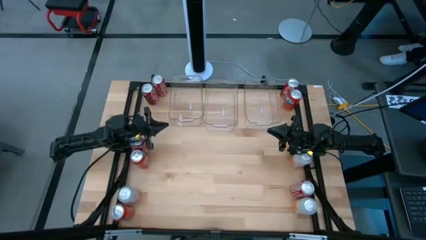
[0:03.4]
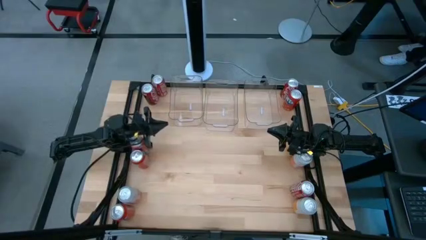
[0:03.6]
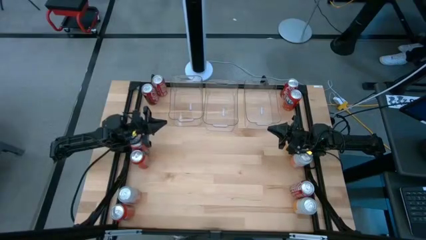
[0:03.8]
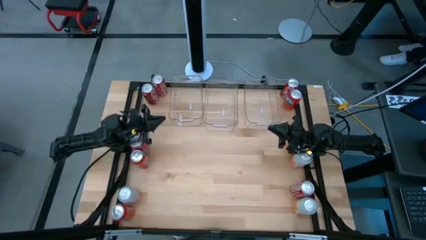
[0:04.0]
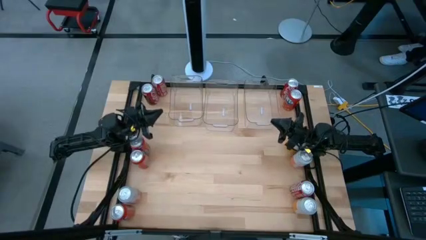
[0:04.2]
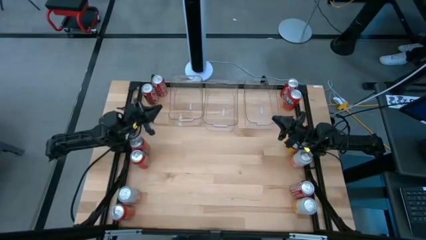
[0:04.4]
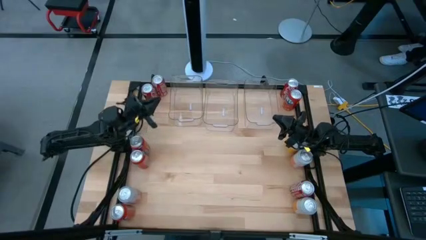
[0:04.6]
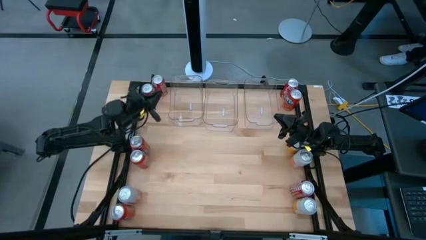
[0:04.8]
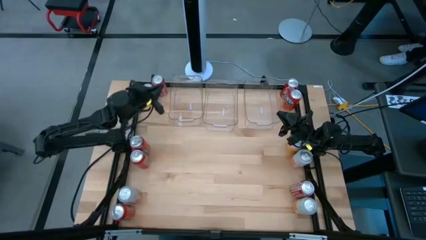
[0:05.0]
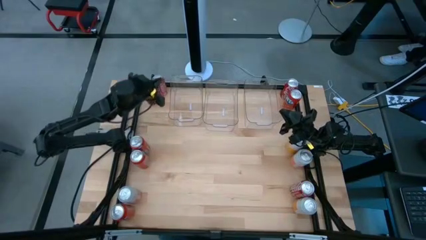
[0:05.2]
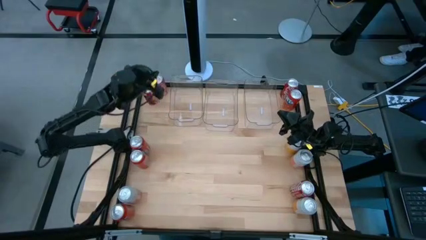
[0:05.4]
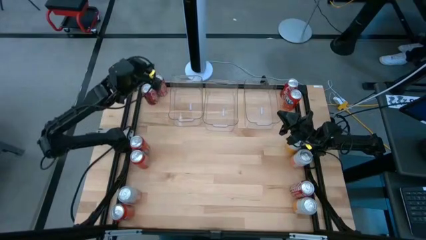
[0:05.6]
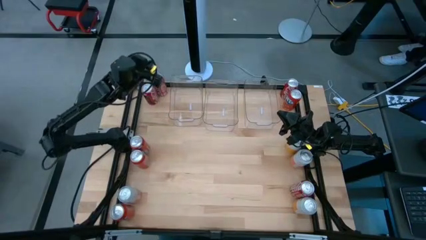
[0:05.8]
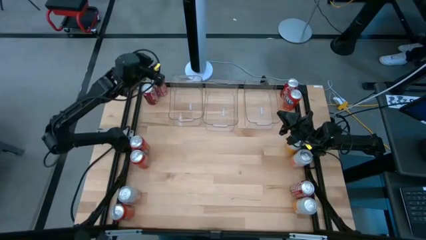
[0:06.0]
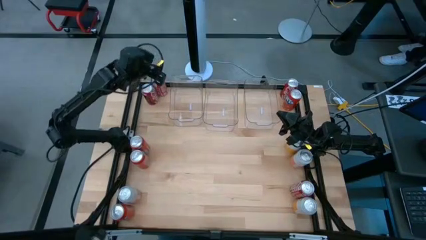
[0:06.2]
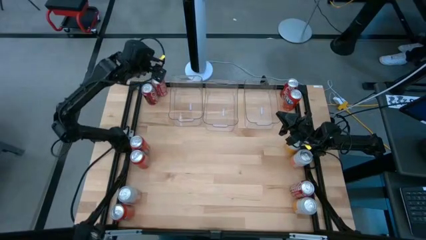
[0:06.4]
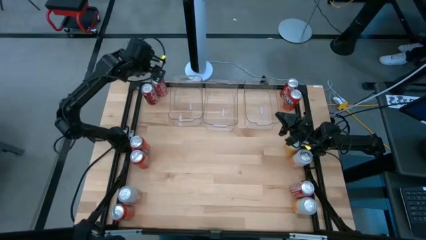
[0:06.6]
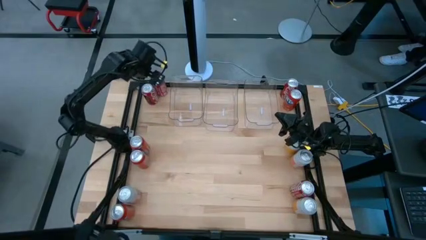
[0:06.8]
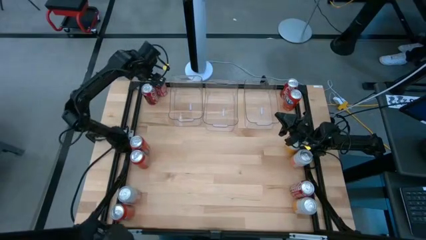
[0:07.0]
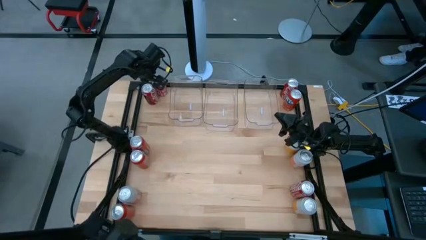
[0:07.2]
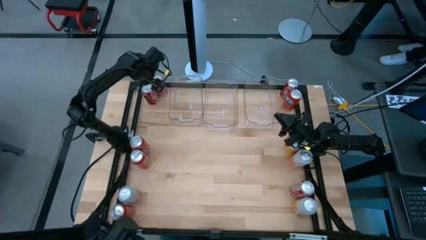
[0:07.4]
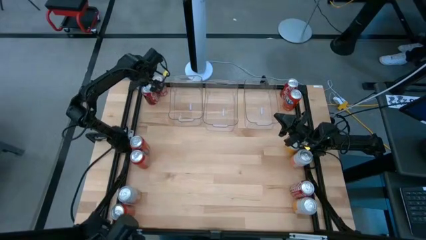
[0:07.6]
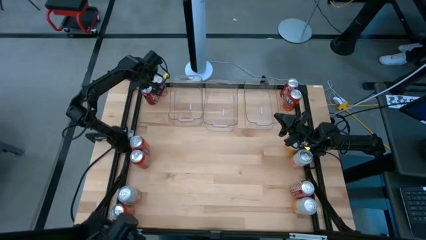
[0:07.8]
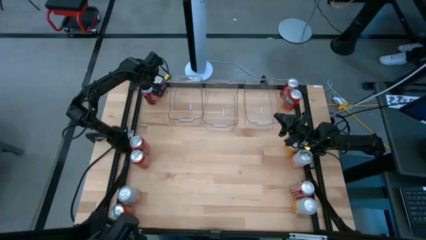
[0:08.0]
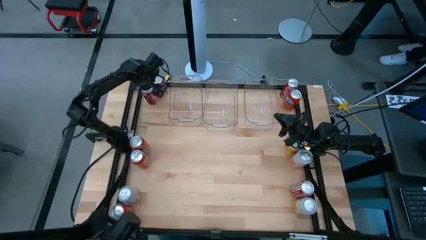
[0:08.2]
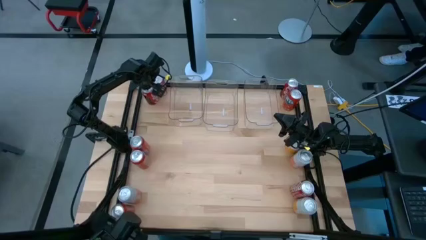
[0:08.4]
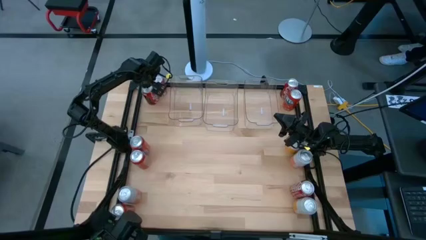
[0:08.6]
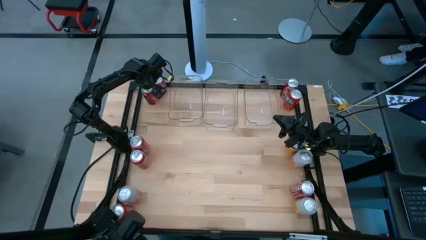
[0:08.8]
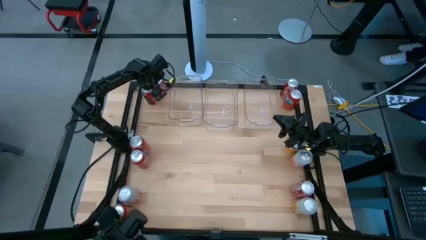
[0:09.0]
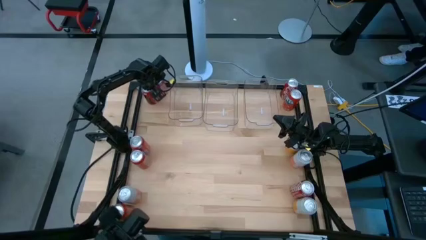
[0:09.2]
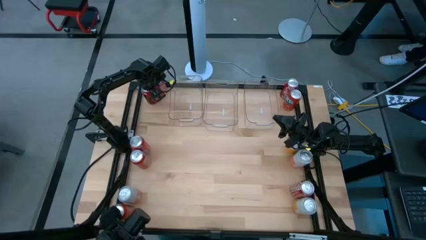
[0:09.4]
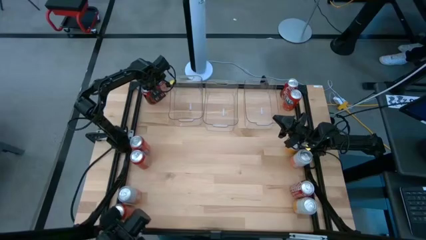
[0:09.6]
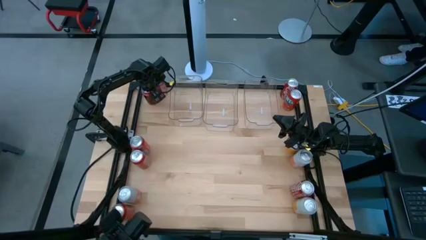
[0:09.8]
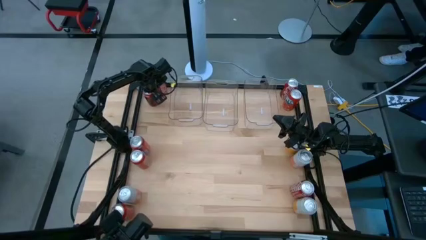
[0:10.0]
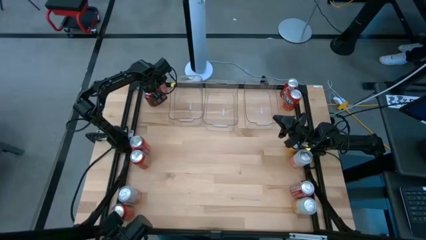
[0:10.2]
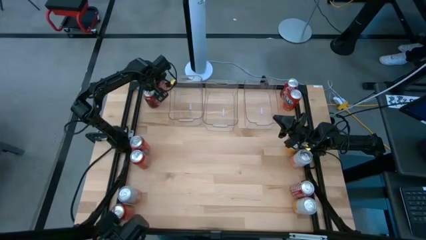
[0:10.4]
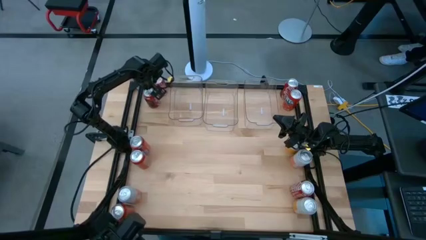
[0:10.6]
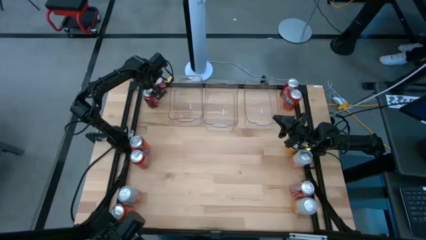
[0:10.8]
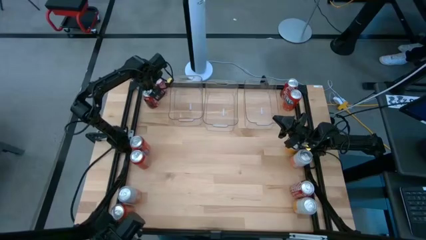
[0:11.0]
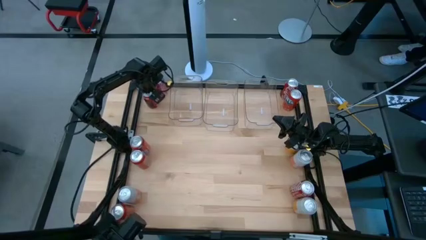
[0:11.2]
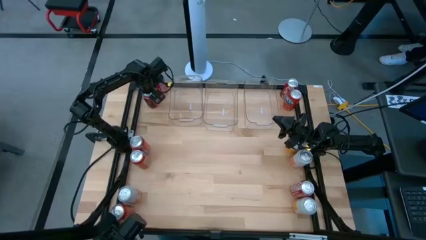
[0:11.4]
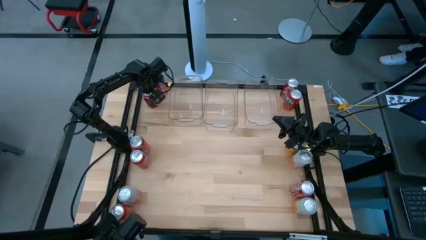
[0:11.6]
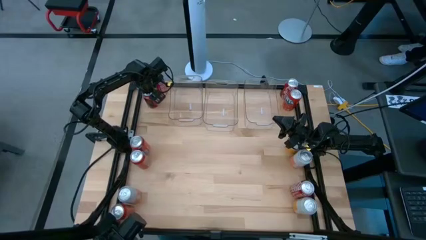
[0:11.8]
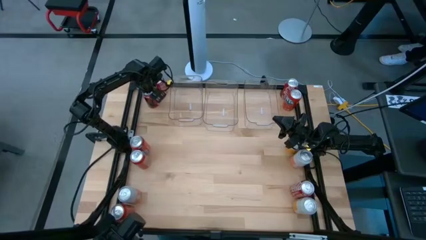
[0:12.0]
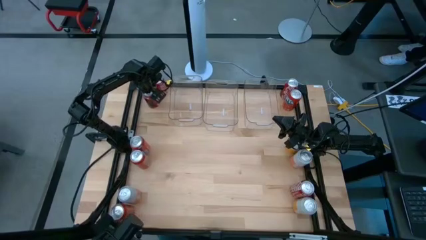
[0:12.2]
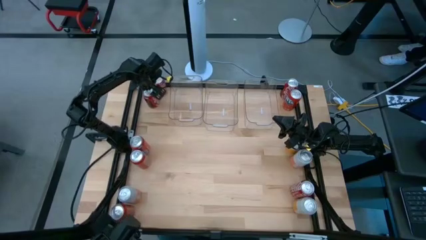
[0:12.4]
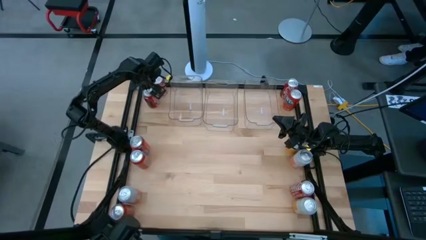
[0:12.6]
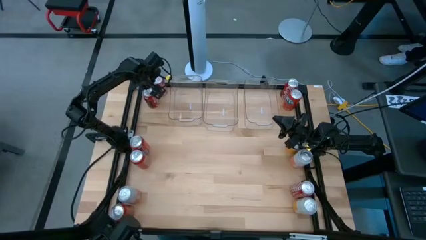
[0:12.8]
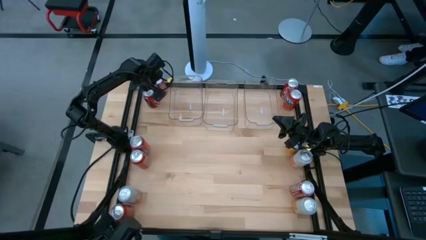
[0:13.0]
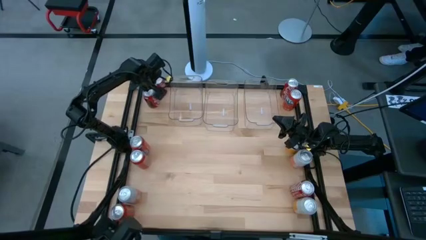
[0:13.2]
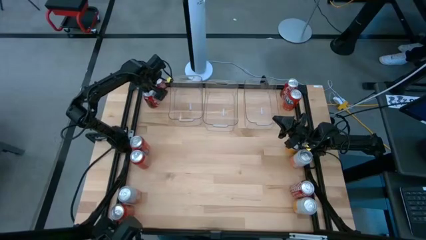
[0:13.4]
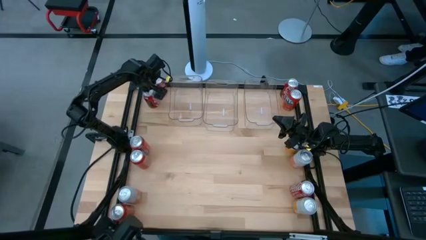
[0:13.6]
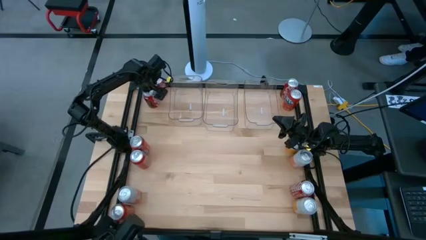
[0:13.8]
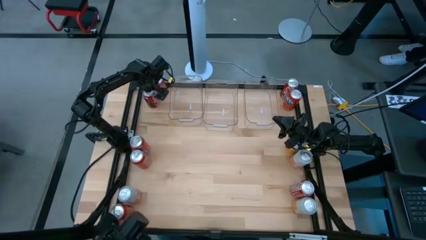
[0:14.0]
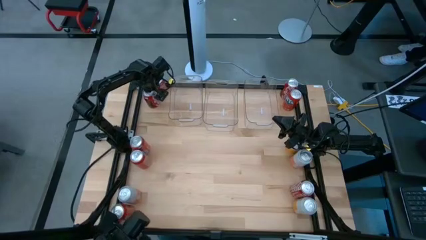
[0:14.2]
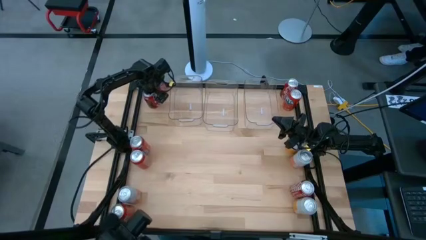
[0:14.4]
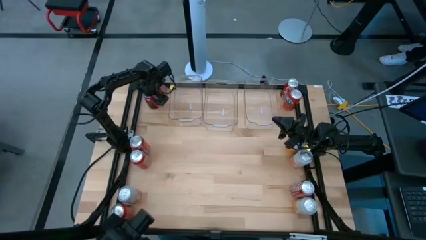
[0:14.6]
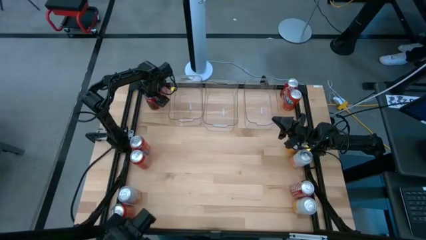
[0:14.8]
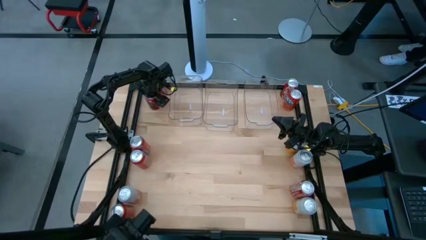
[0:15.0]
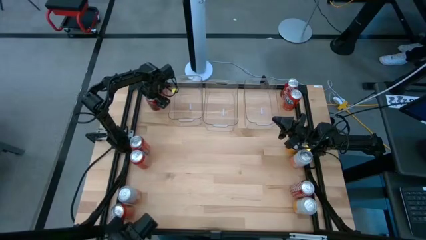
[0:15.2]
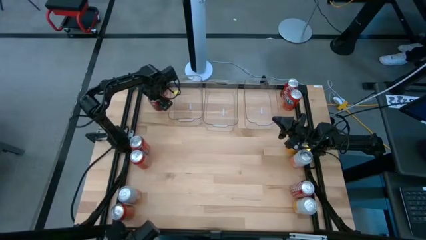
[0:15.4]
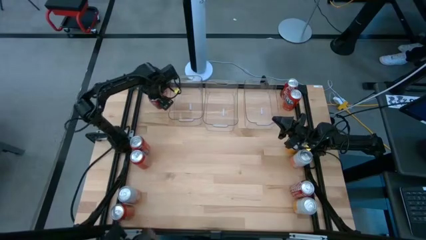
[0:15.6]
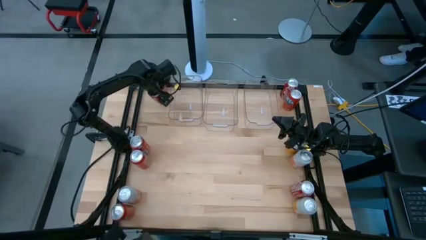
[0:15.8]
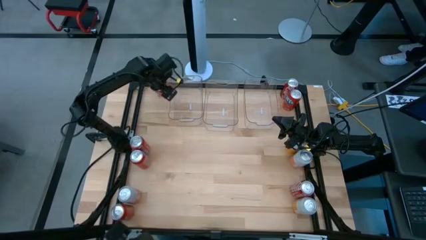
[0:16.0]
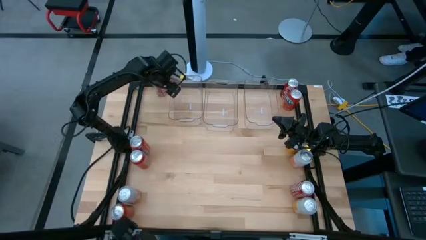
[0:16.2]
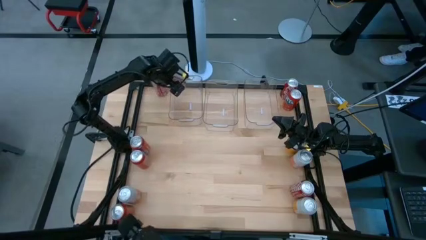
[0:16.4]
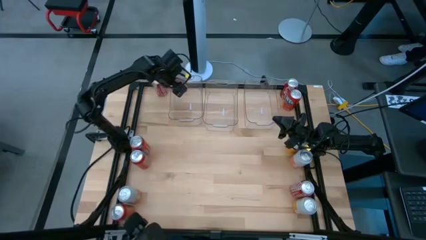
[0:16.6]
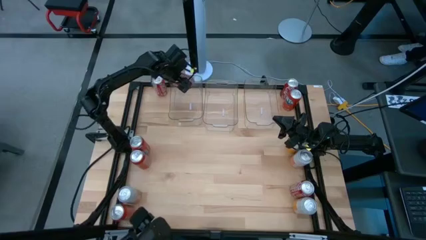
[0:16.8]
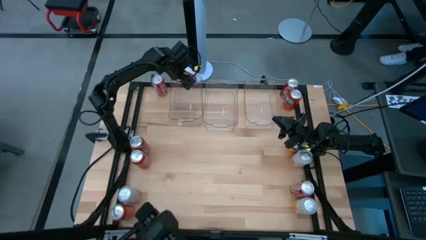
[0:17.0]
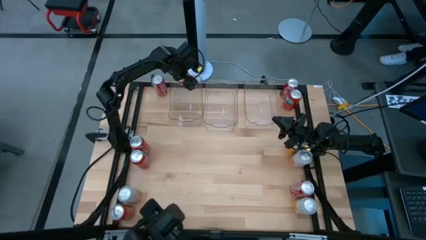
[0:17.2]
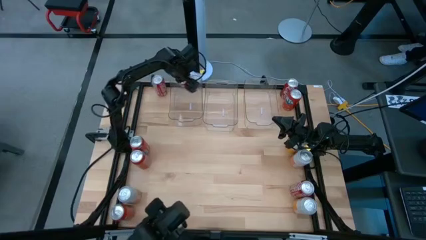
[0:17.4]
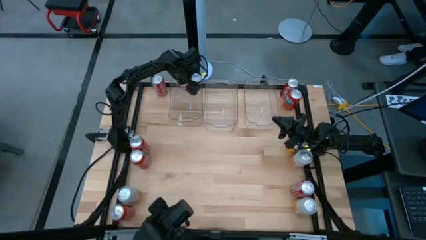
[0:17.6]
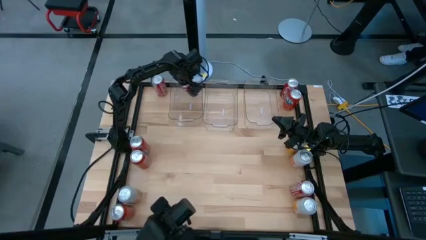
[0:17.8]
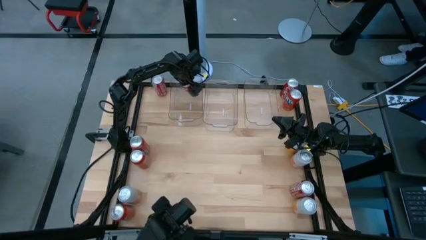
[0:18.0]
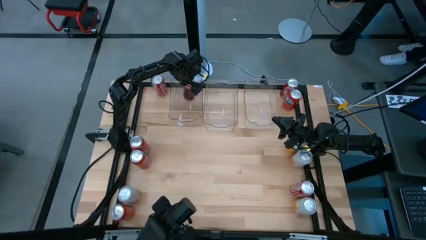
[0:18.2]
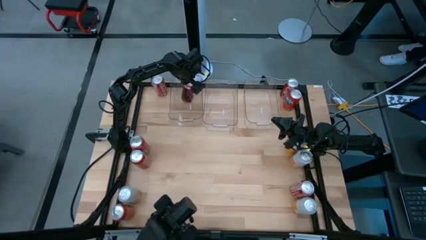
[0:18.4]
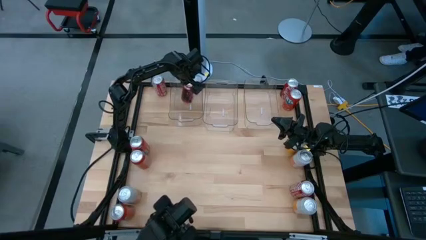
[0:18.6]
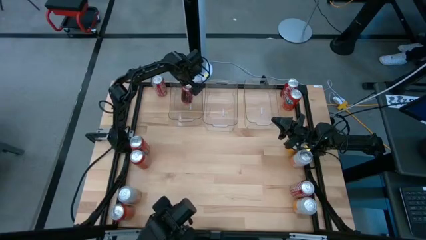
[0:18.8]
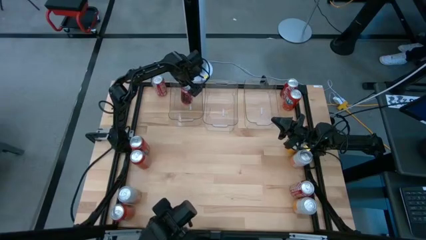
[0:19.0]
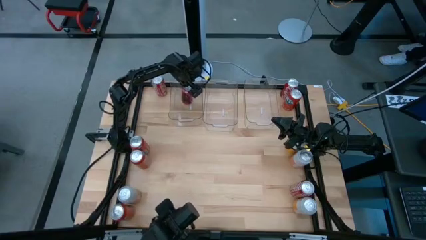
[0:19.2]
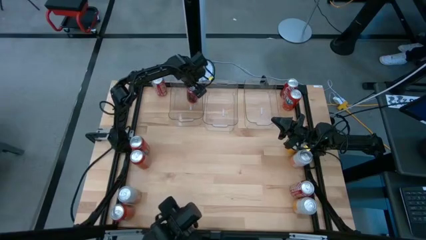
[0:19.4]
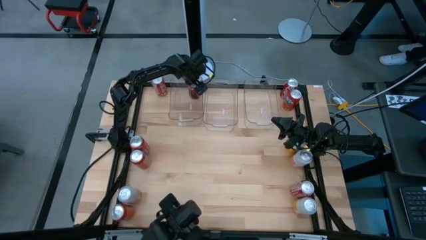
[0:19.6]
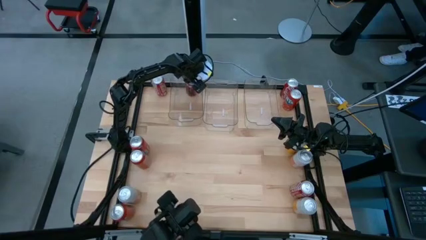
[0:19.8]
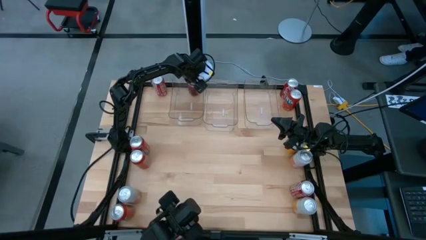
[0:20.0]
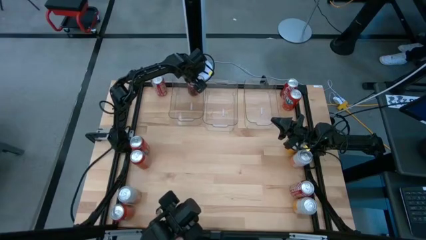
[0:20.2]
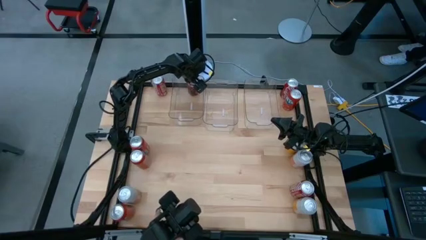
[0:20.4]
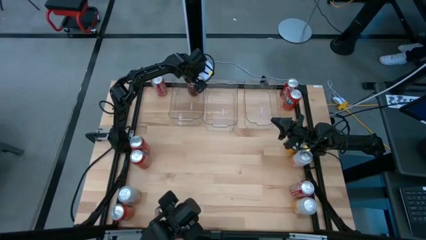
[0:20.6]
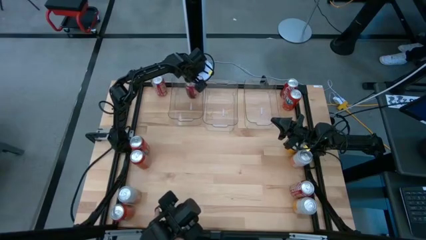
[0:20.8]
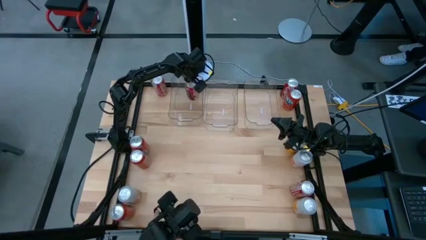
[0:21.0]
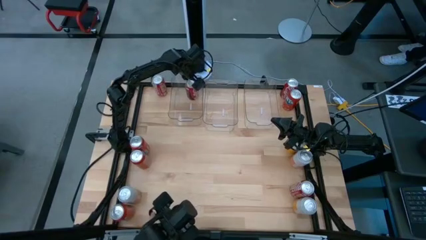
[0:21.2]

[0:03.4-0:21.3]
Task: Sort soda cans
Put the bottom left top red soda can into the left transparent bin
